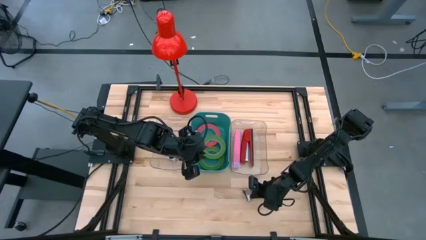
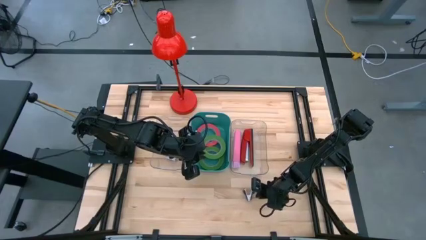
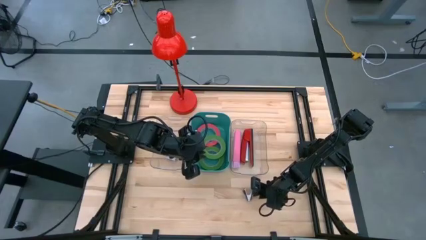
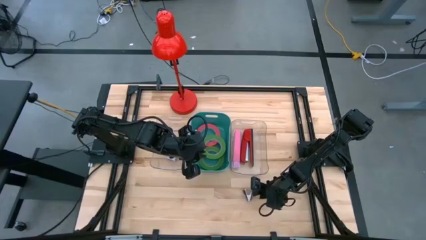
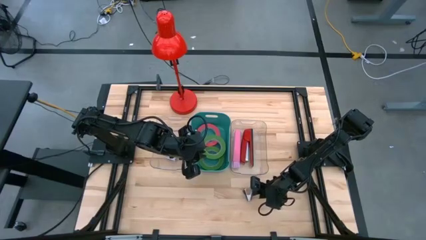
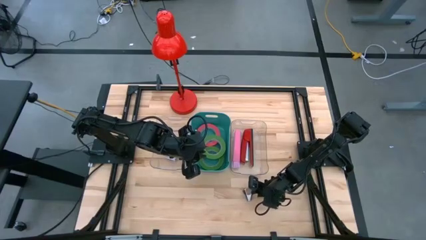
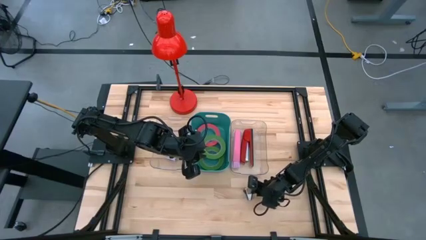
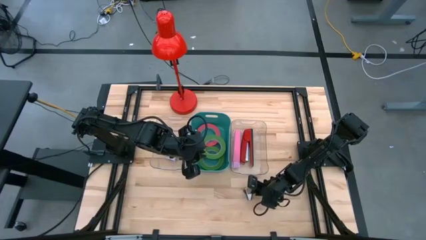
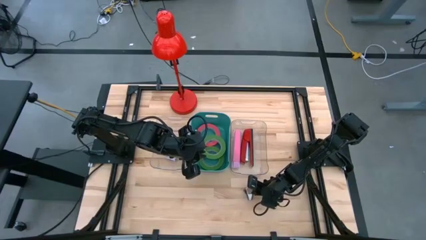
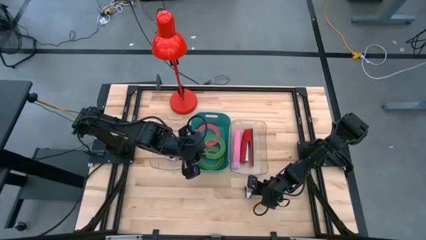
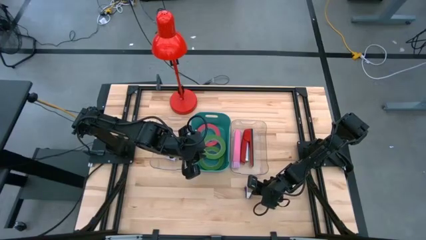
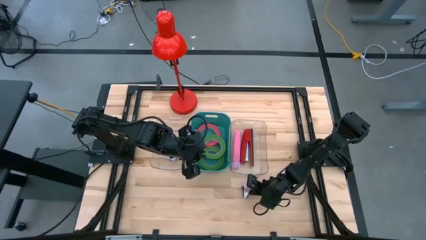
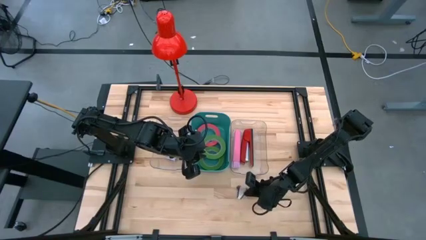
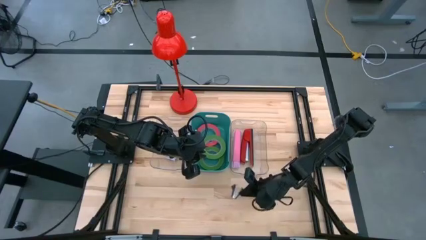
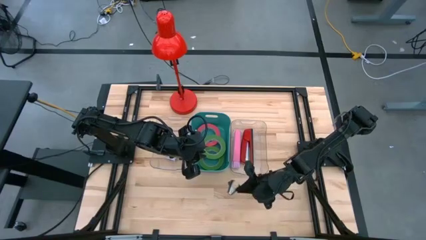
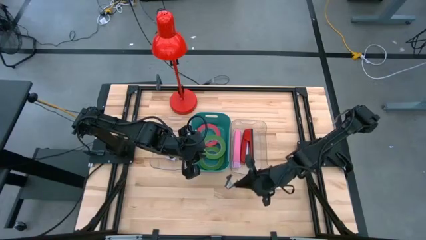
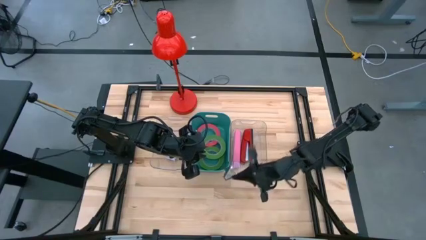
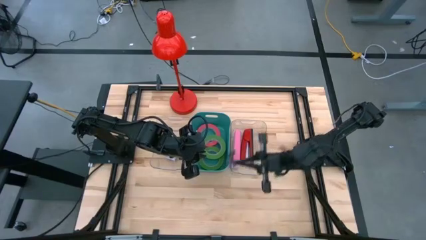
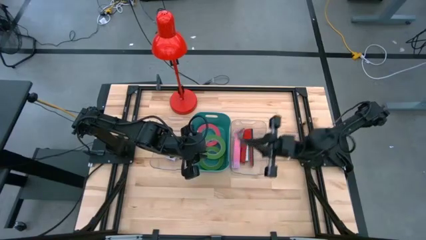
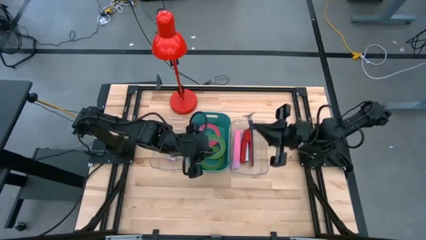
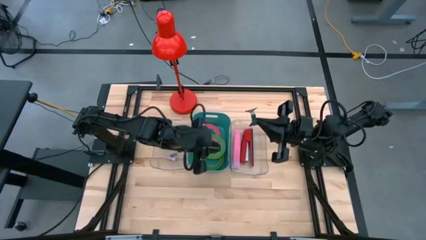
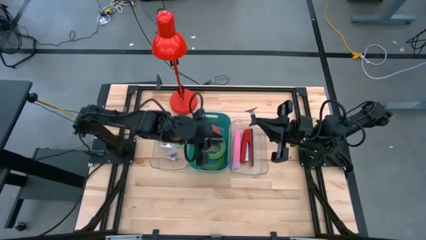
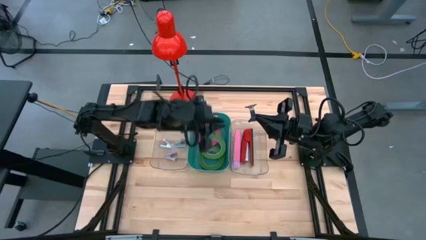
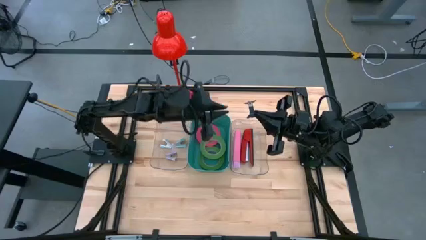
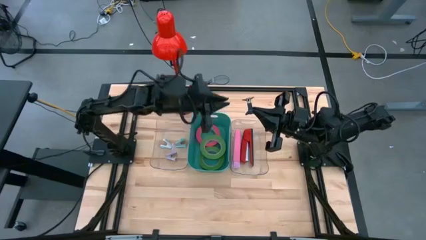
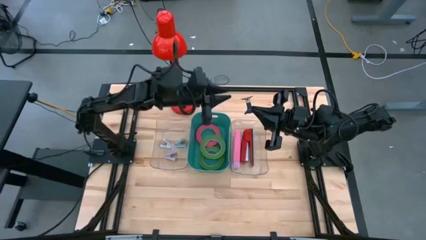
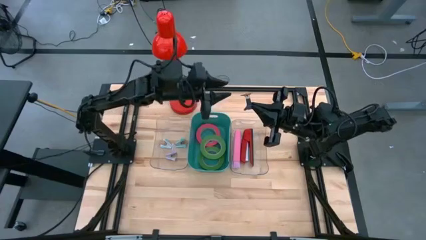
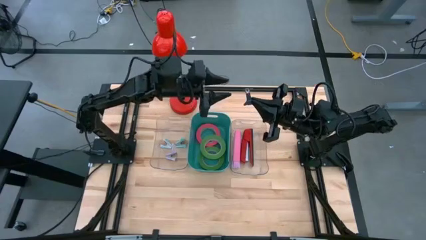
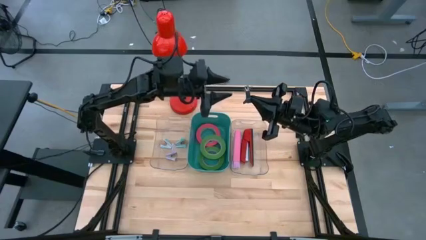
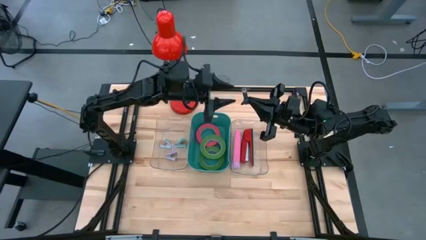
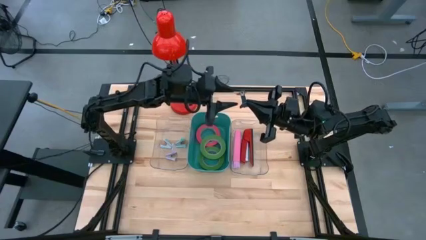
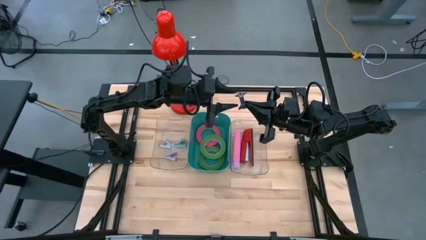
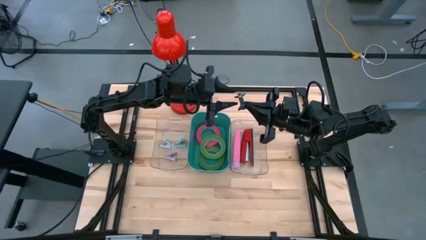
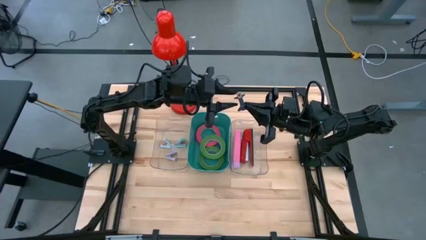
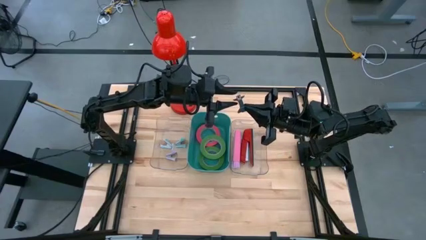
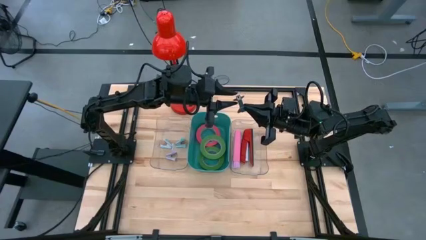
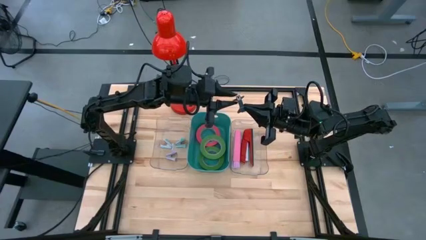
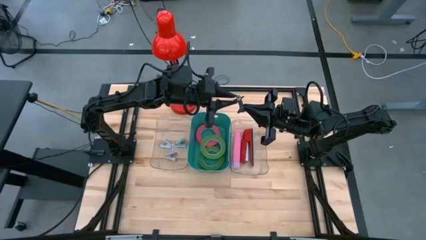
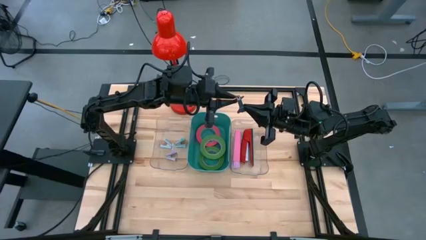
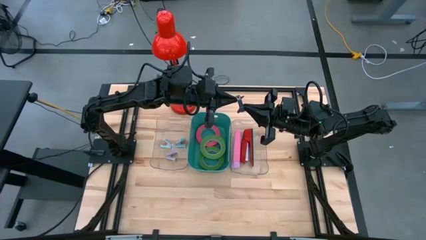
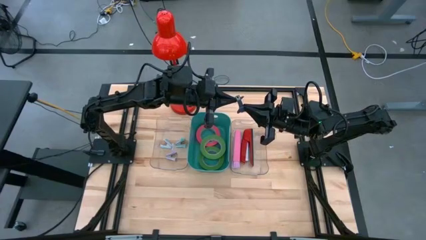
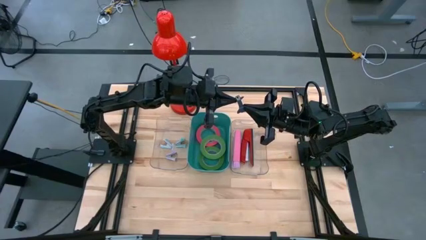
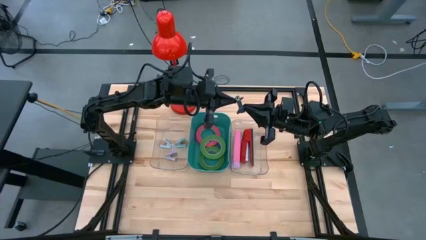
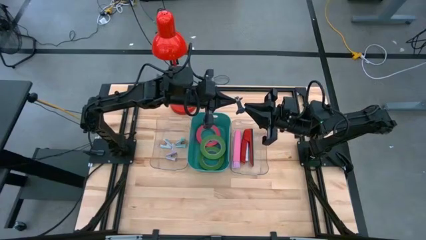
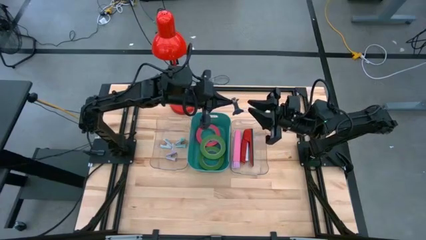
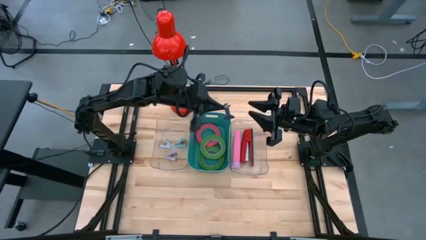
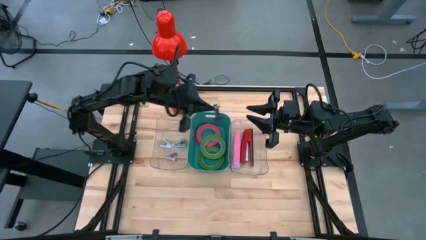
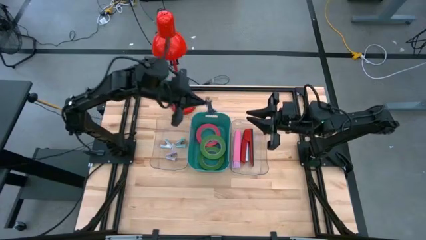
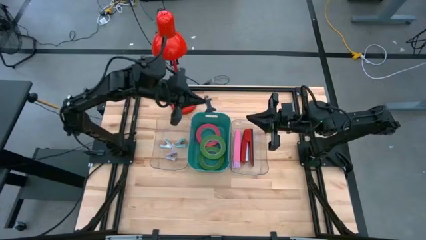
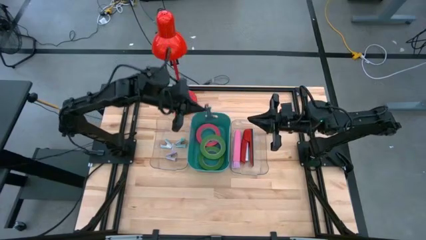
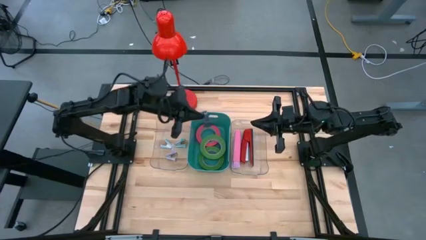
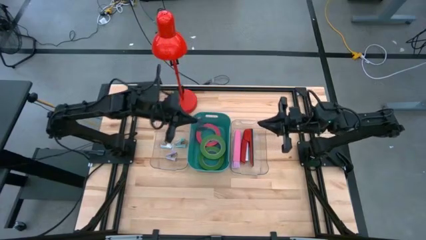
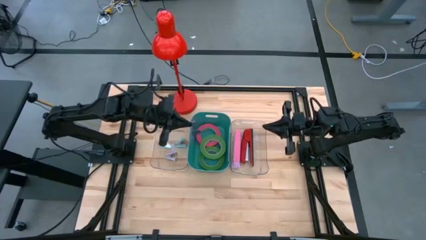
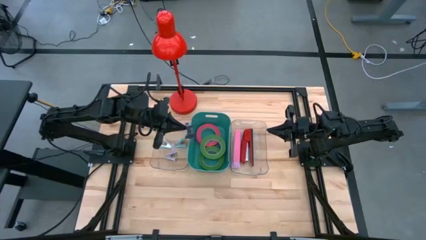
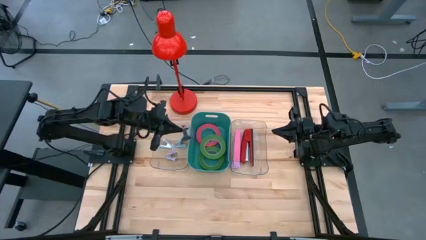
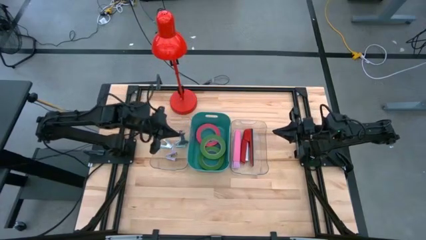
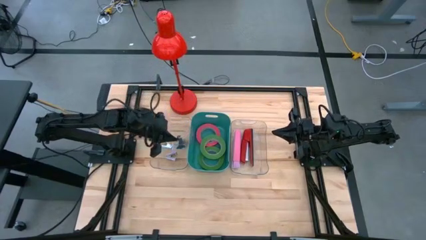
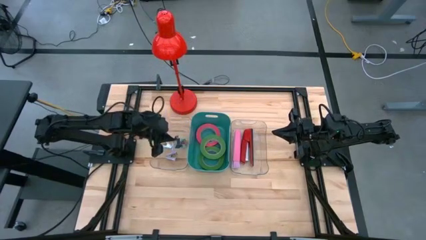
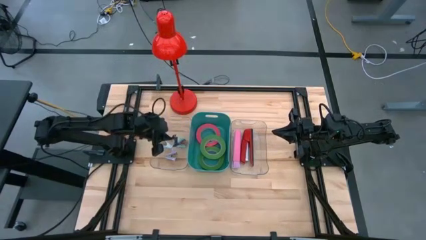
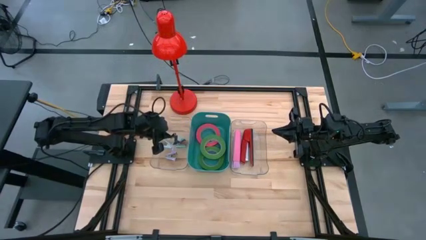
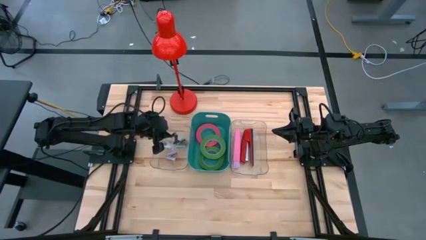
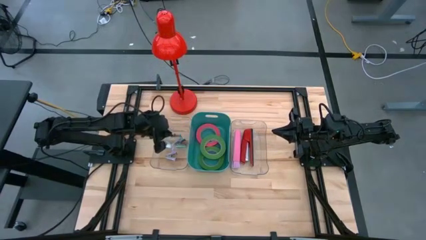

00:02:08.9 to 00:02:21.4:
Task: Pick and place Stapler, Stapler remover, tape
Put the black stapler remover into the left transparent bin
